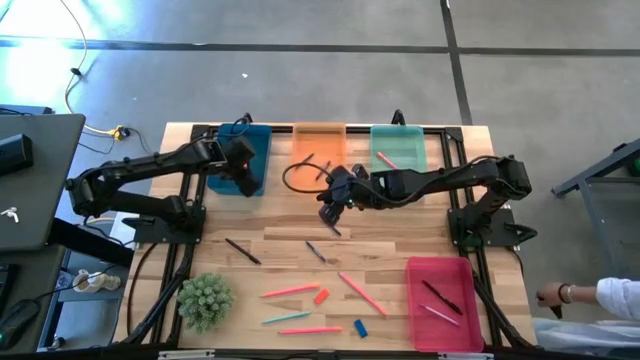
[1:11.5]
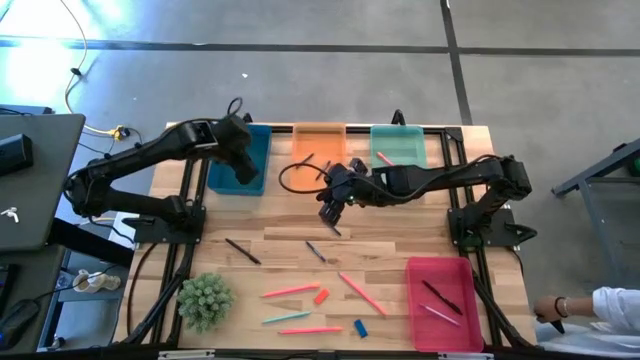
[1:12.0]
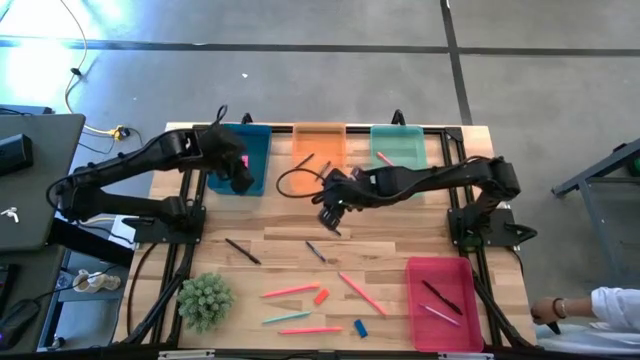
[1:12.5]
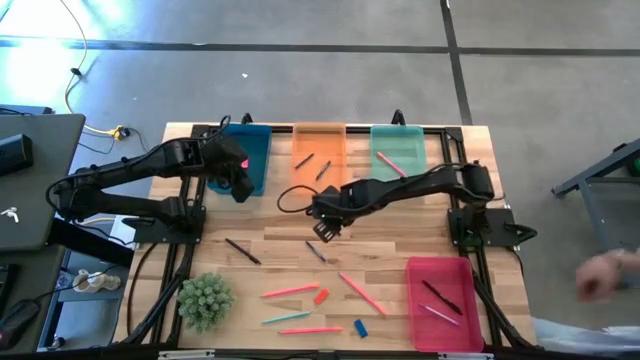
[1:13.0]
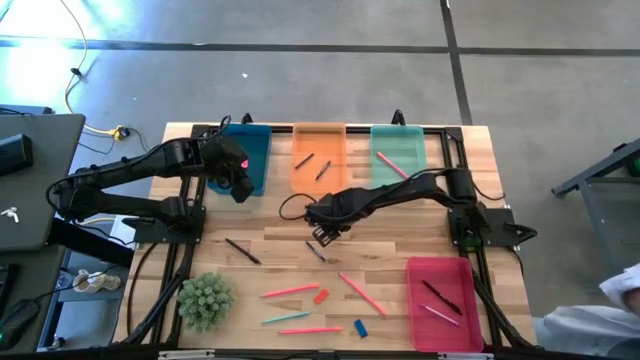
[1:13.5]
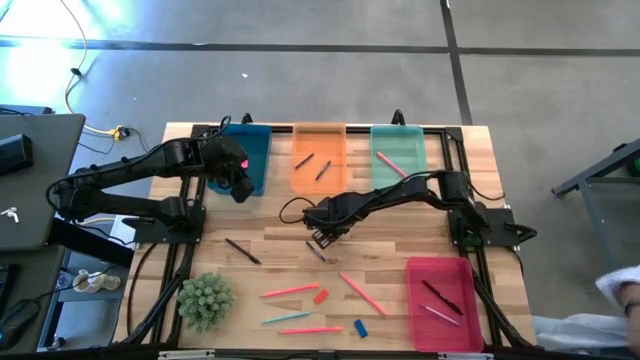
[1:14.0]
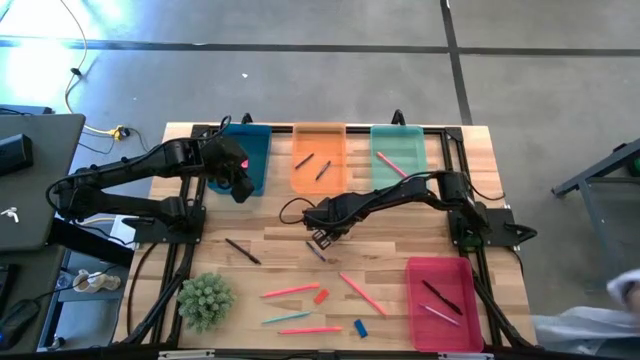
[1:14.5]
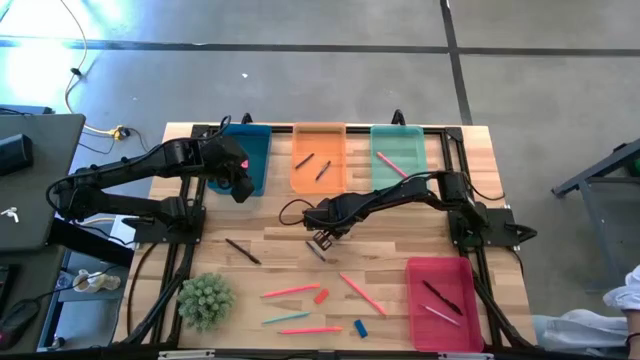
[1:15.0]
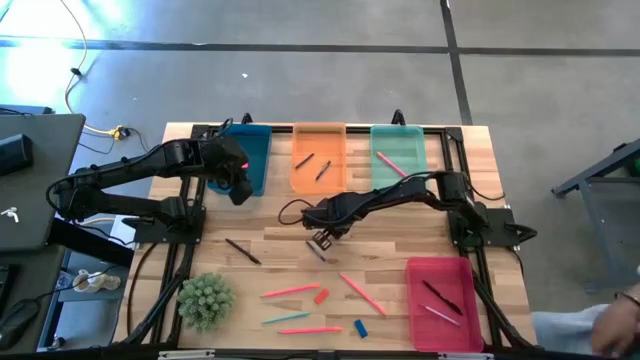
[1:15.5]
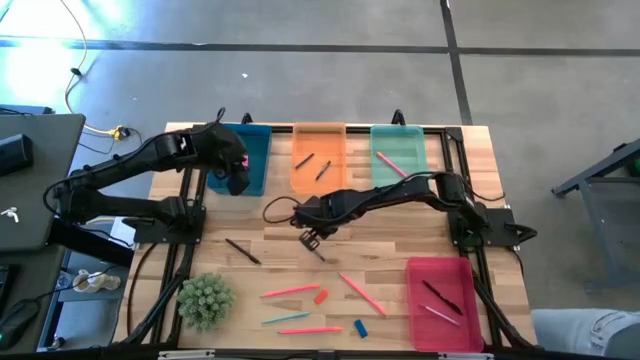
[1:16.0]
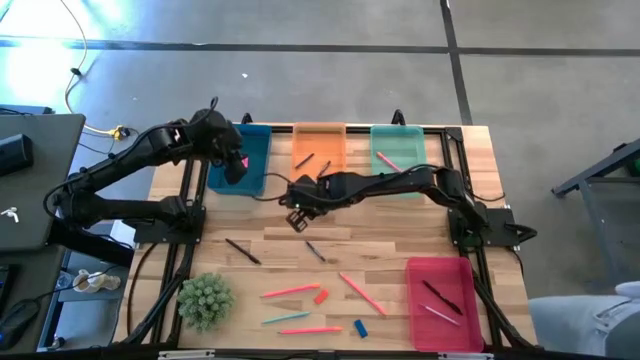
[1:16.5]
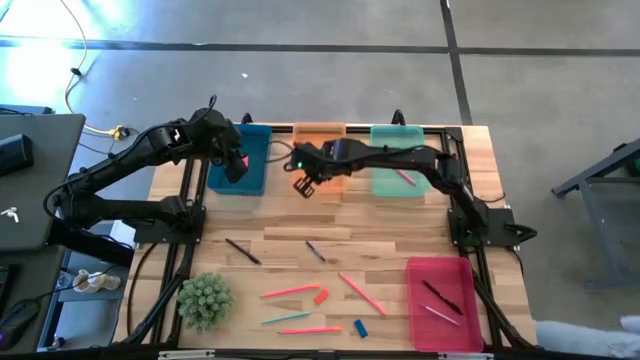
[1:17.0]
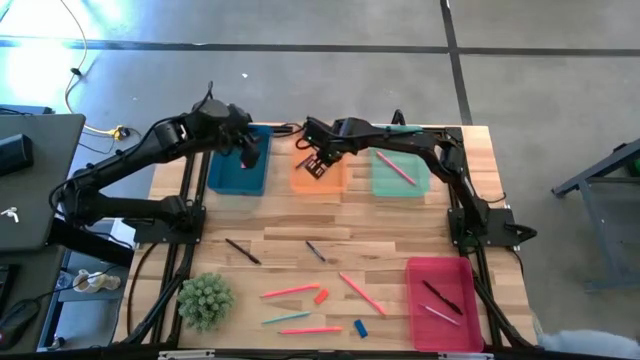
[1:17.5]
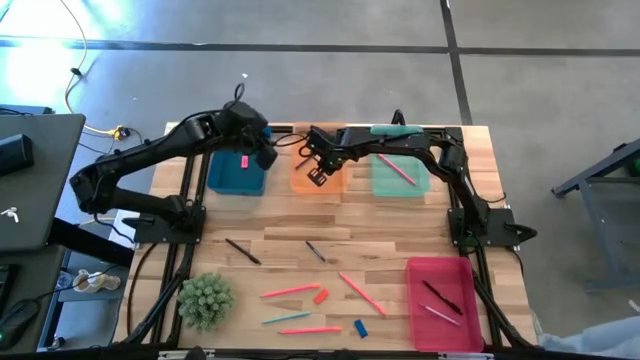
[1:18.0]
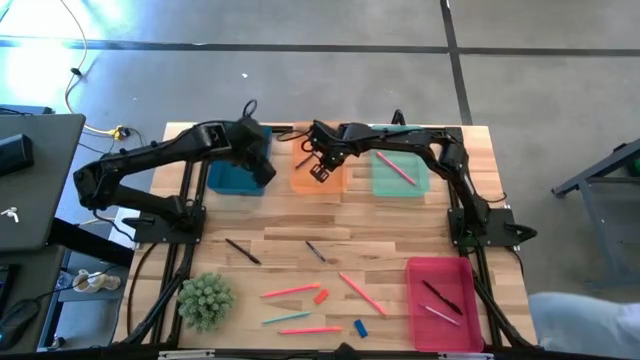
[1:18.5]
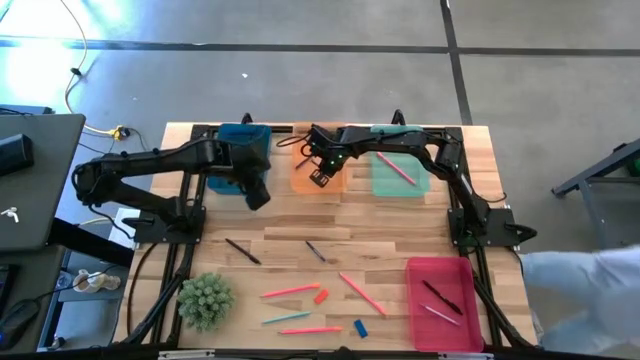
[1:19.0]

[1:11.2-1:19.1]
Task: Sort crayons/erasers/pens/pencils in bins
Put the top blue crayon into the orange bin

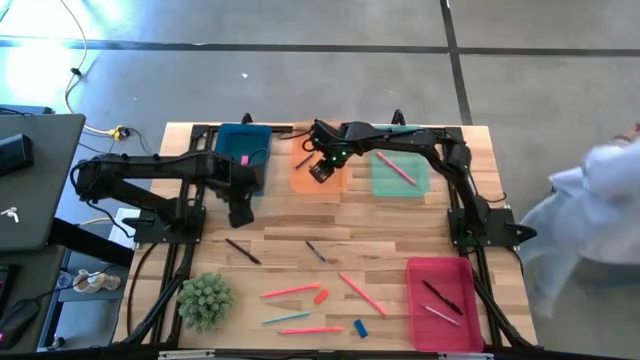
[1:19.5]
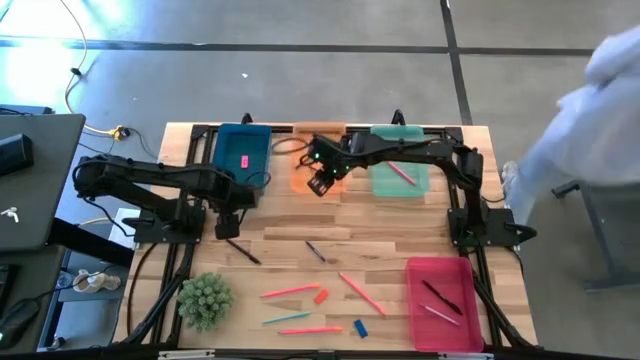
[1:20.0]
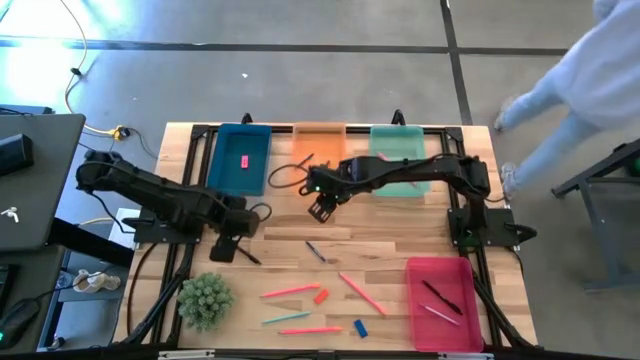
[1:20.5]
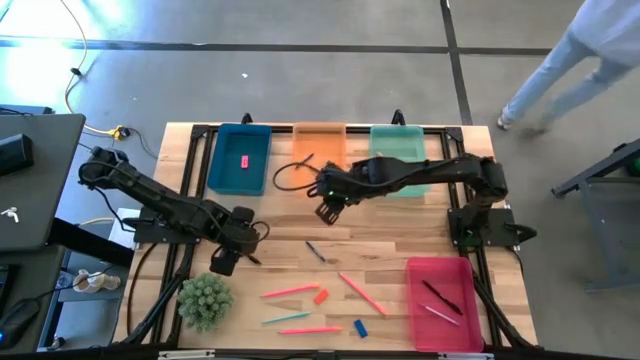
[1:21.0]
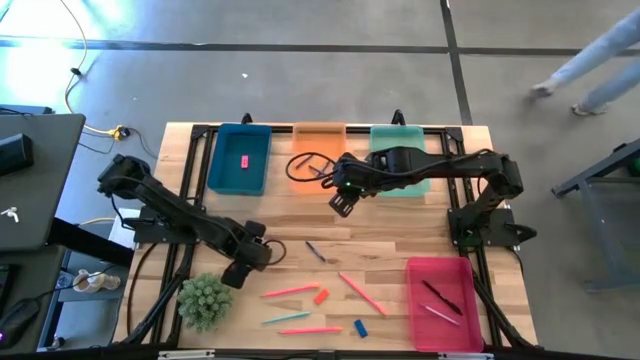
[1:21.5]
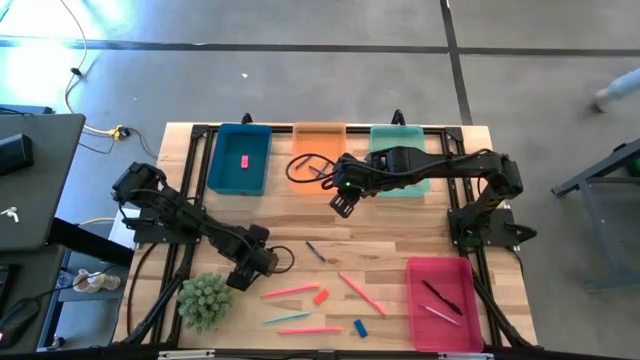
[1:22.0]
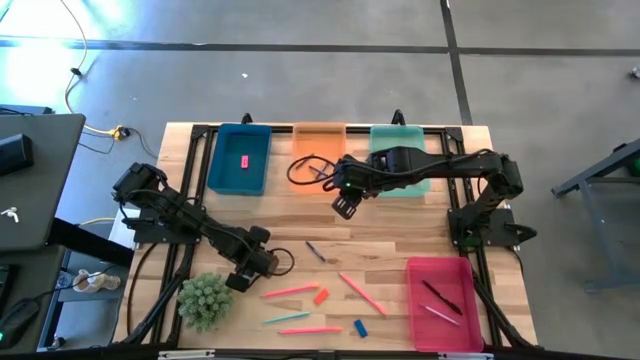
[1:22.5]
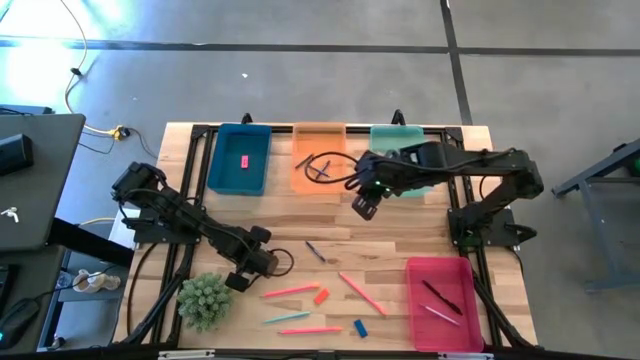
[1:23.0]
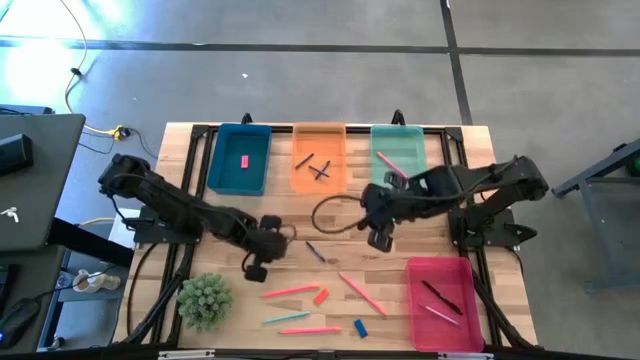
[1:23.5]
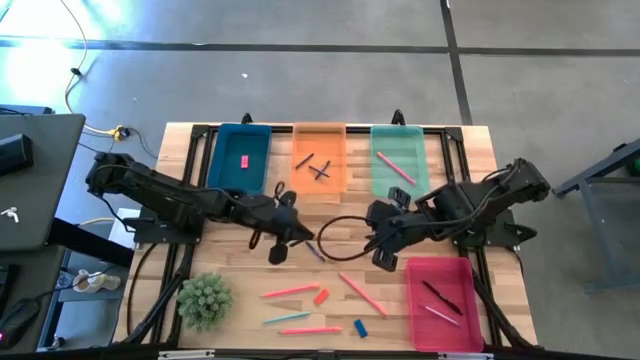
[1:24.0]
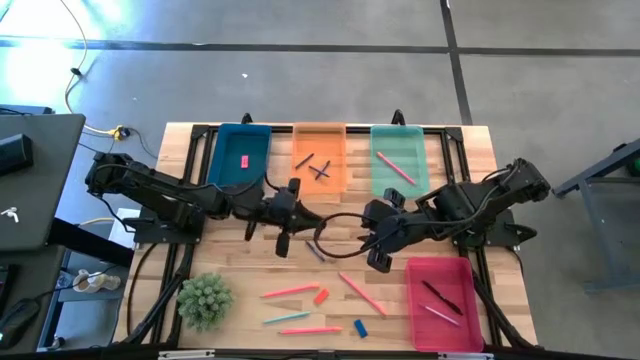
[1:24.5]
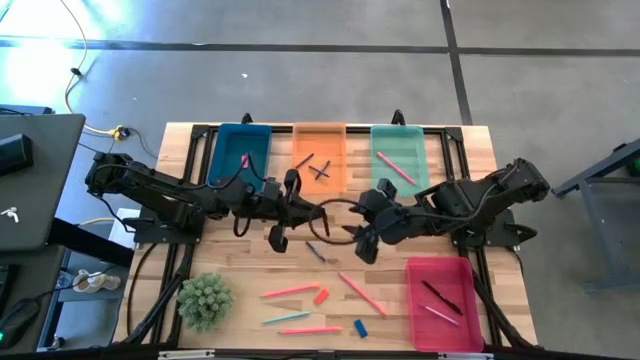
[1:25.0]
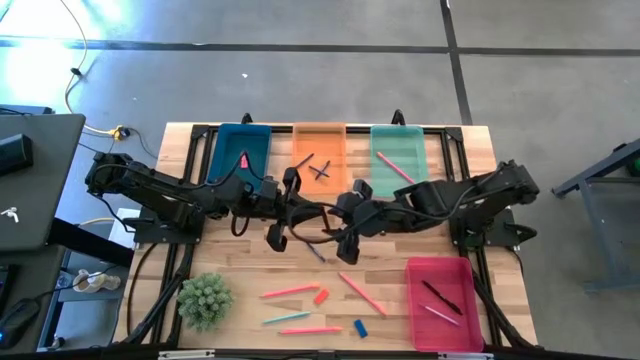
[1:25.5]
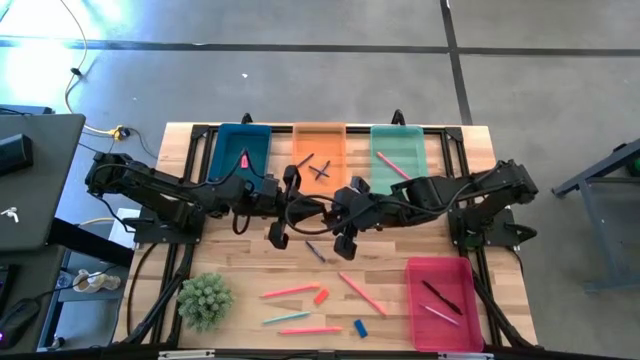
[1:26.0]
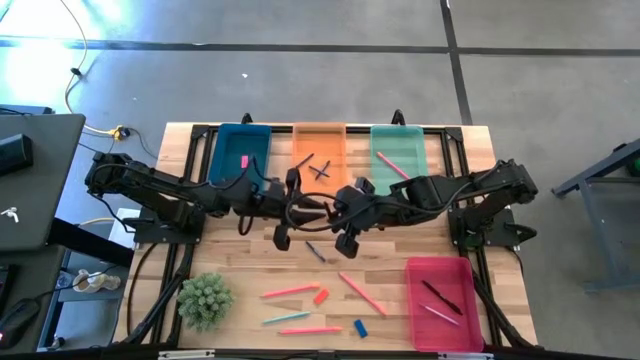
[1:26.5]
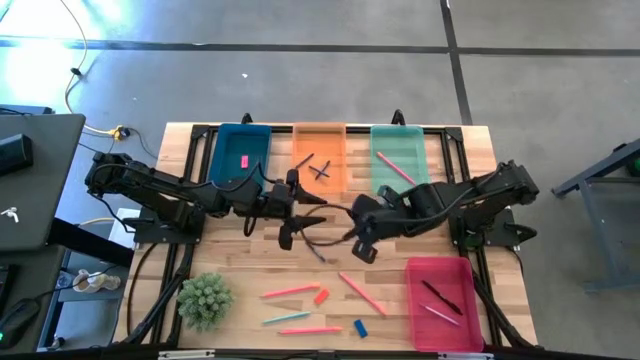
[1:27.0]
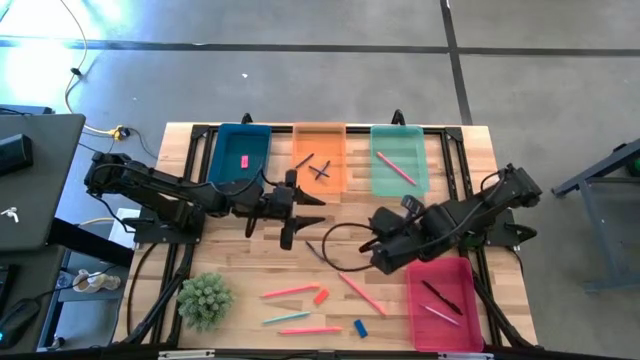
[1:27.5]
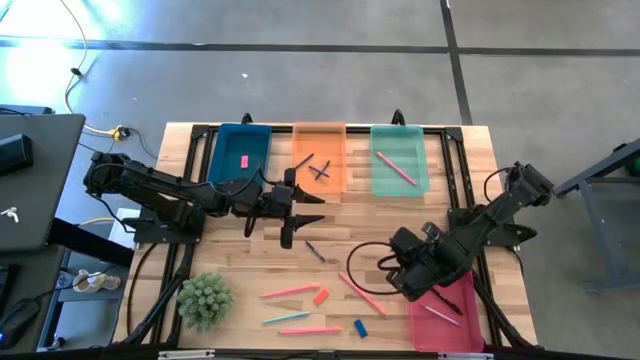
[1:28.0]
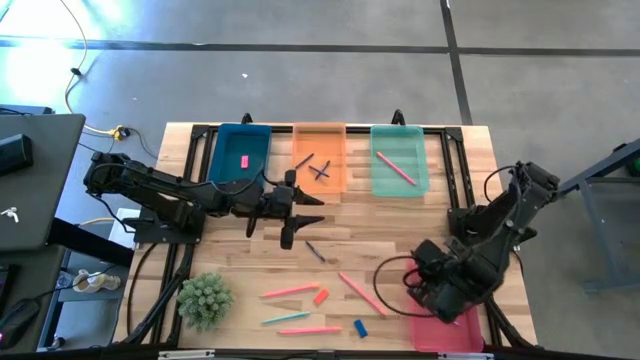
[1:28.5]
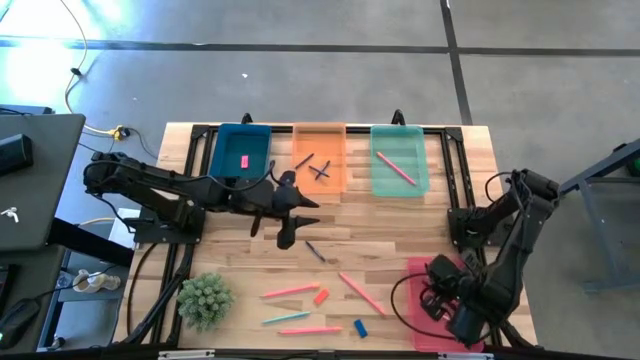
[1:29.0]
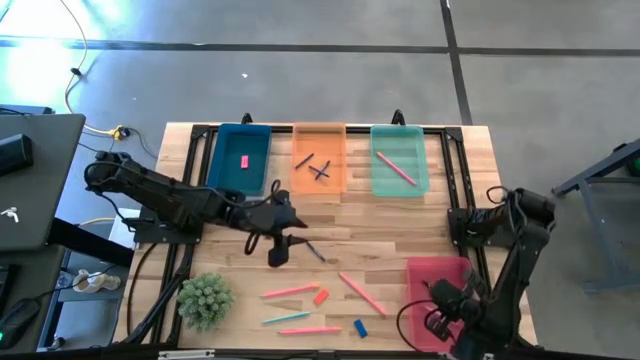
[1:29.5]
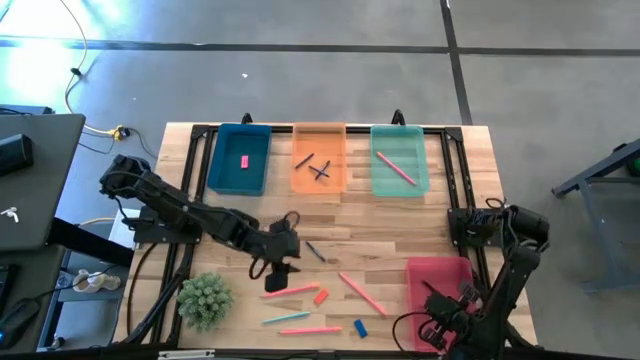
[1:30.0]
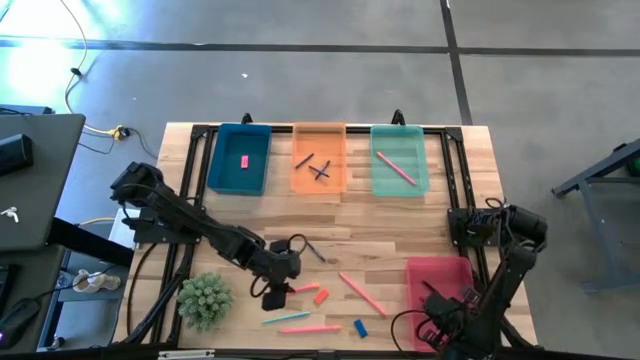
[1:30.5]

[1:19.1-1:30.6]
Put the black pen into the pink bin

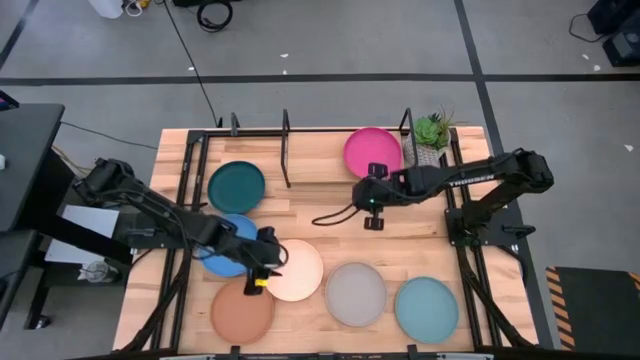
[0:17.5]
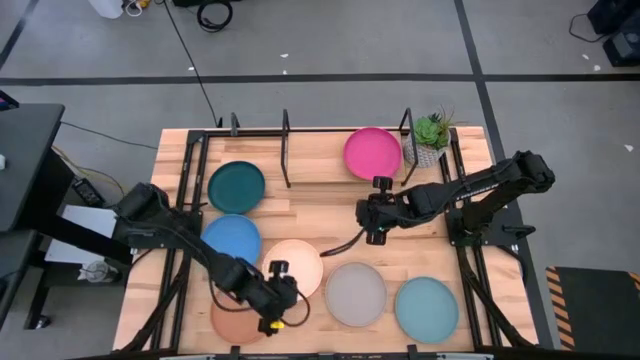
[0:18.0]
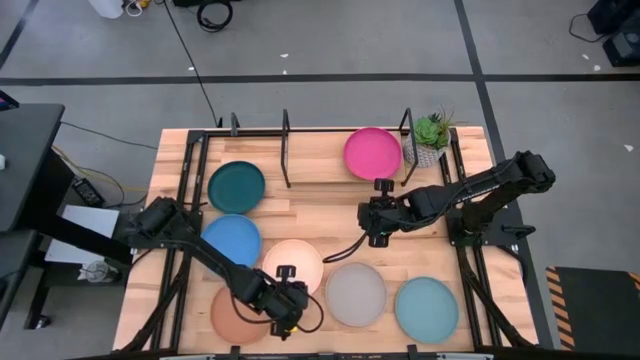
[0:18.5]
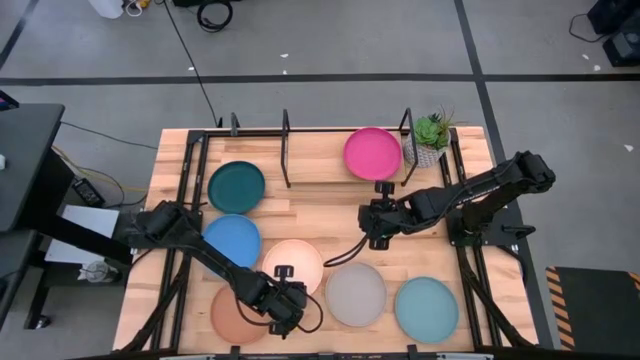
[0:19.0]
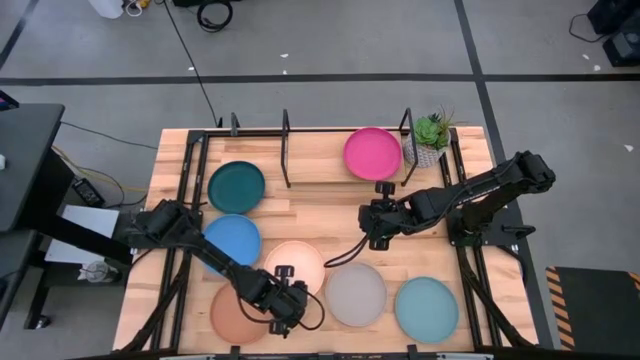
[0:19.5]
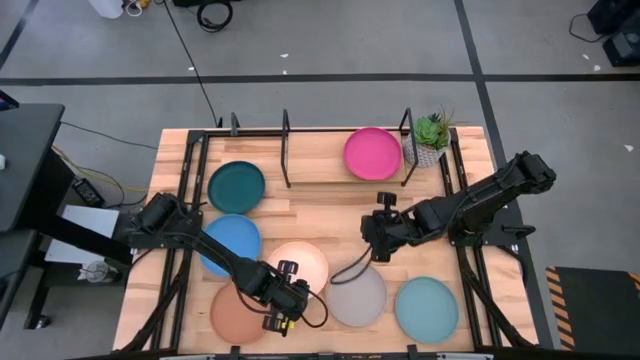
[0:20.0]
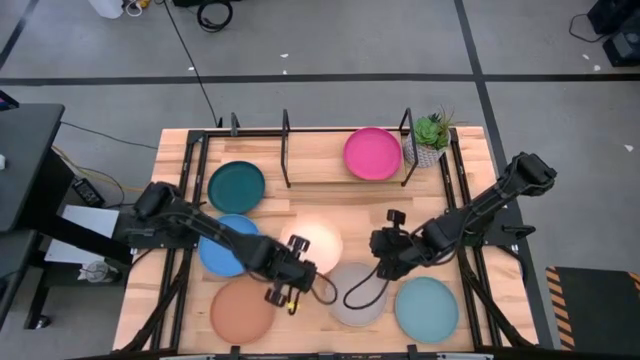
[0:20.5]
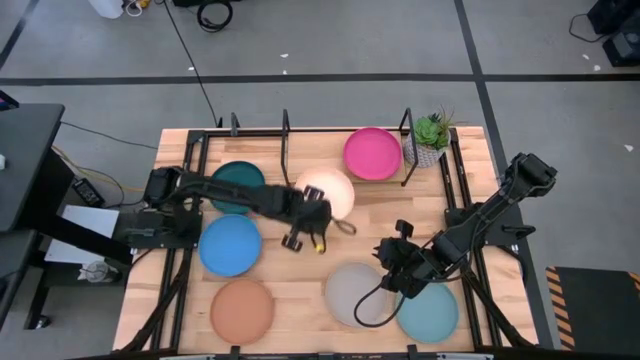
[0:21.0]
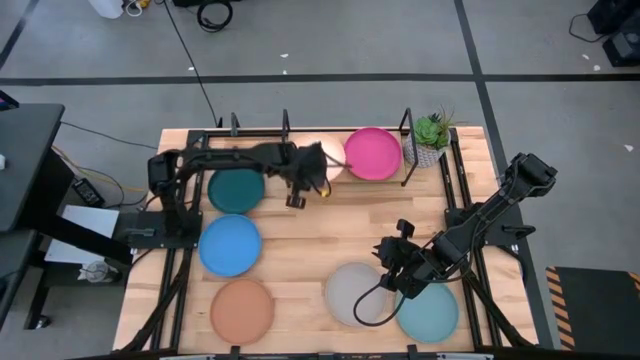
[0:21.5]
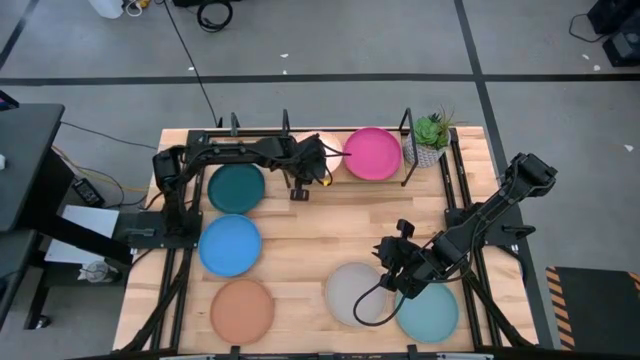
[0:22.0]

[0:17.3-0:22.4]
Task: Place and stack plates onto a shelf
Put the white plate on the shelf
